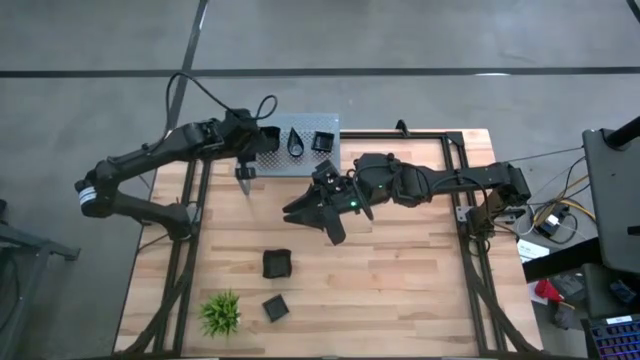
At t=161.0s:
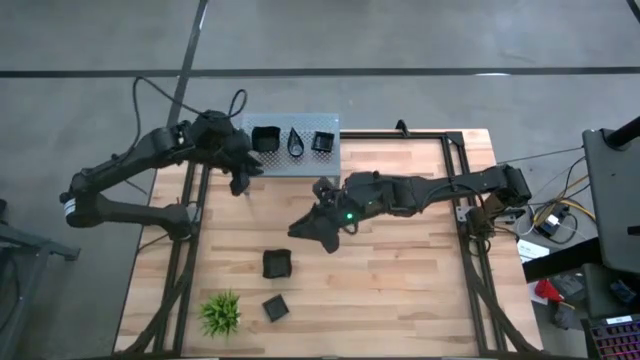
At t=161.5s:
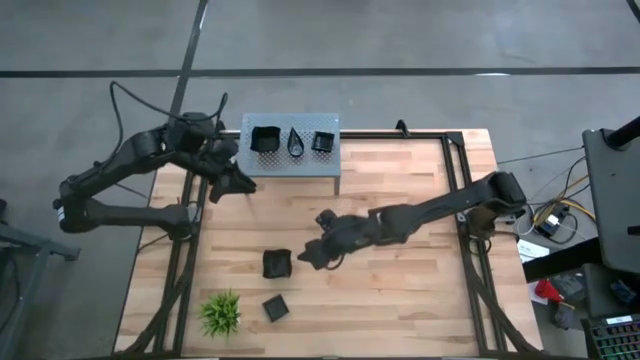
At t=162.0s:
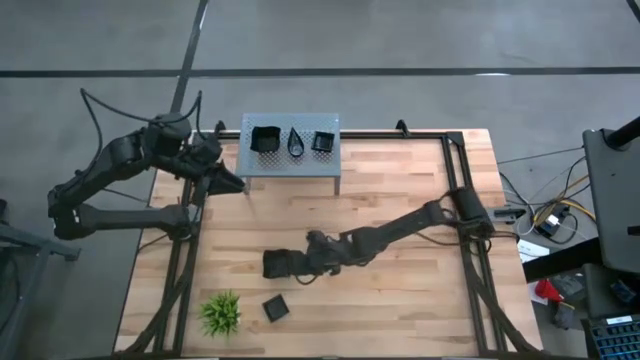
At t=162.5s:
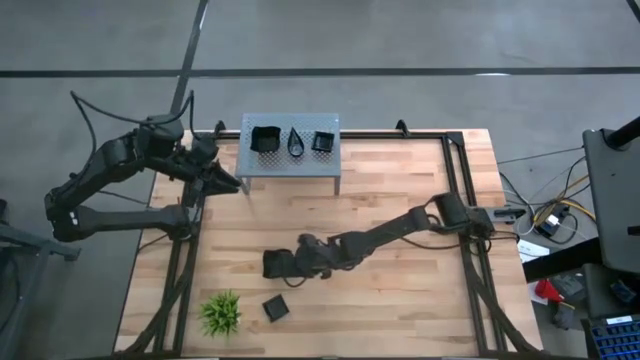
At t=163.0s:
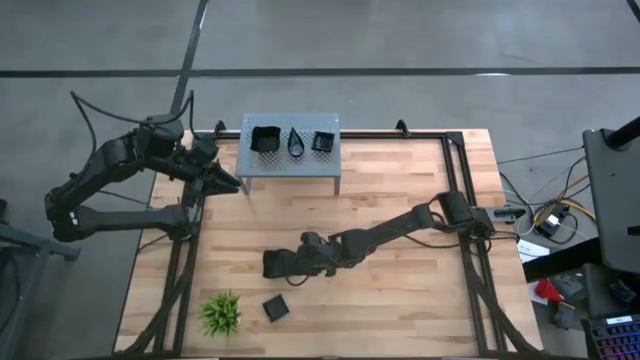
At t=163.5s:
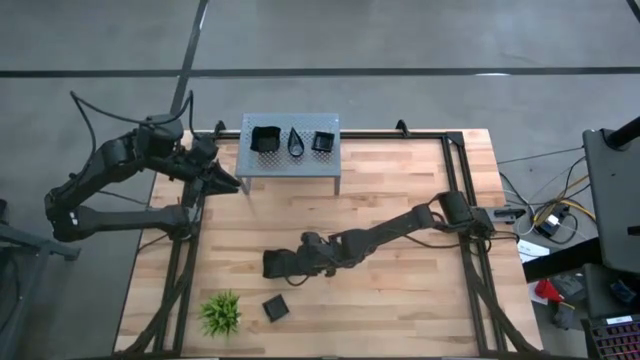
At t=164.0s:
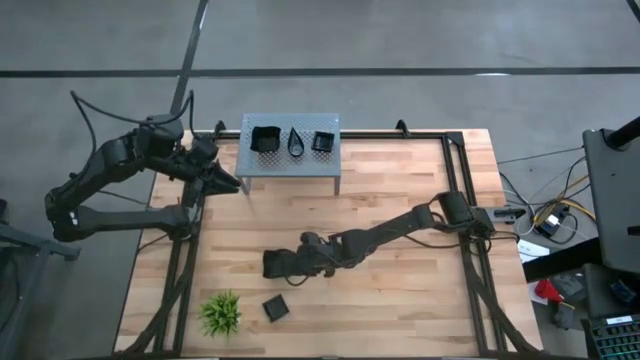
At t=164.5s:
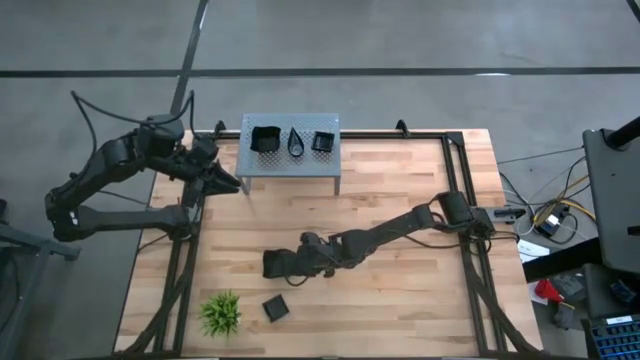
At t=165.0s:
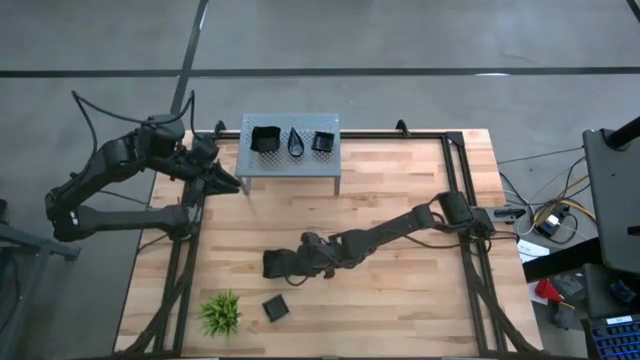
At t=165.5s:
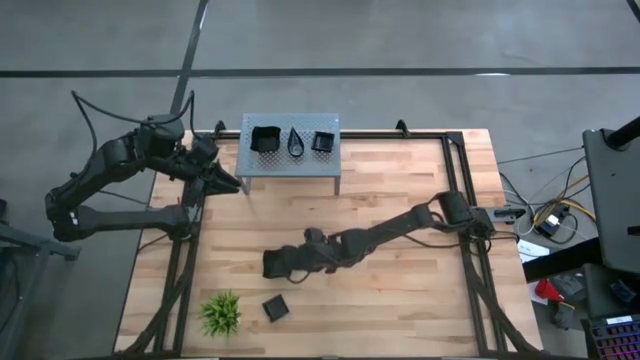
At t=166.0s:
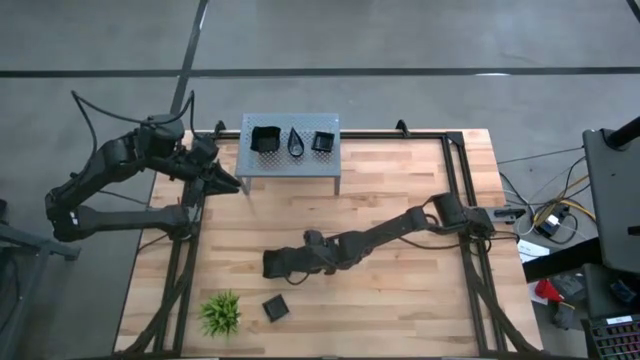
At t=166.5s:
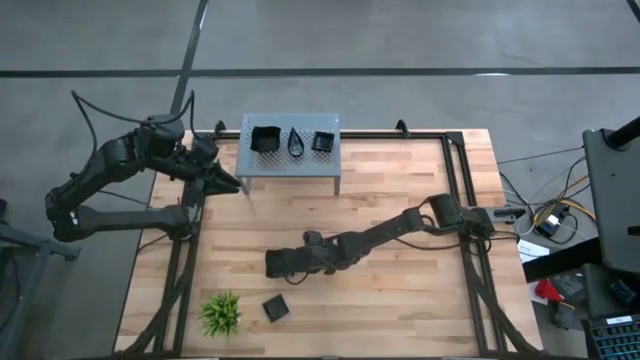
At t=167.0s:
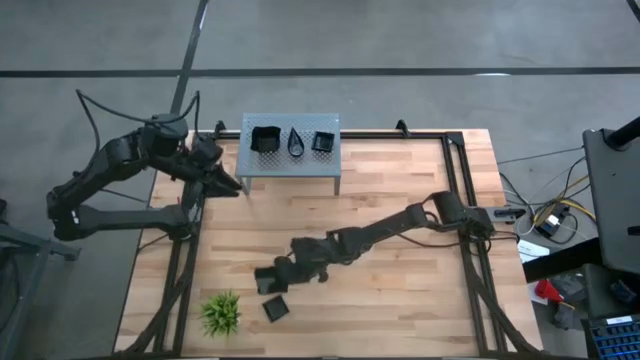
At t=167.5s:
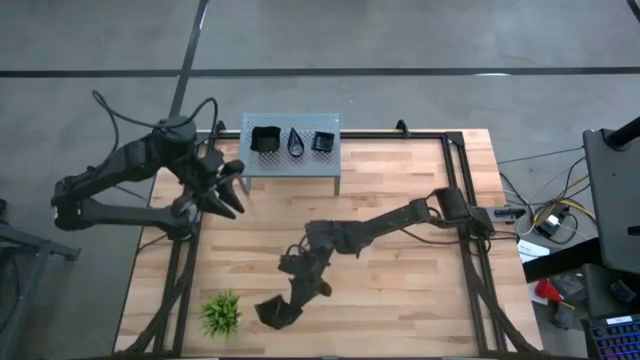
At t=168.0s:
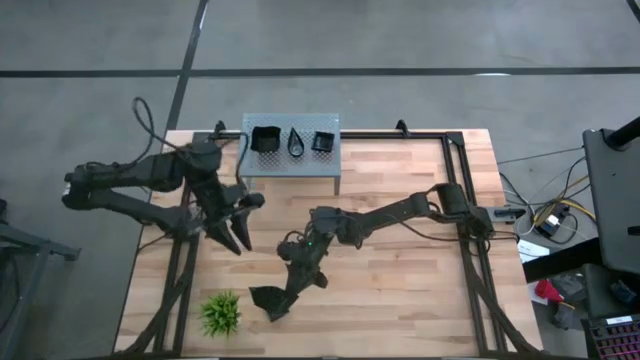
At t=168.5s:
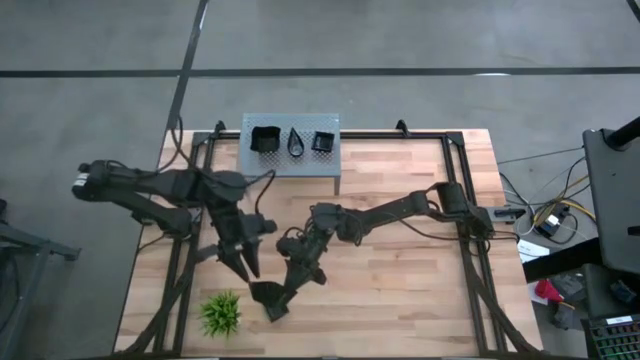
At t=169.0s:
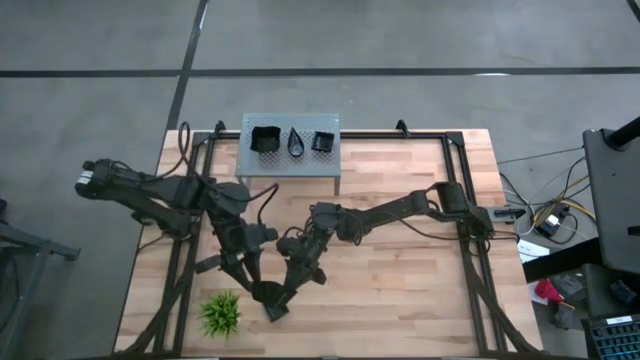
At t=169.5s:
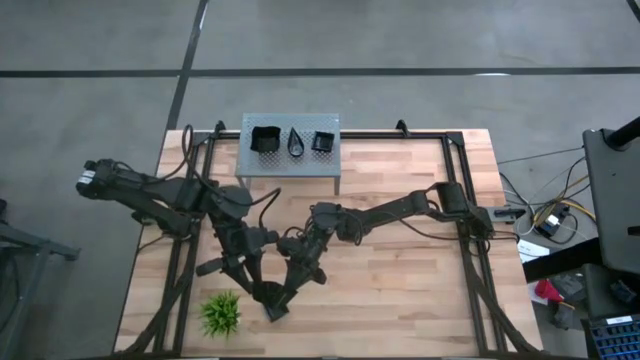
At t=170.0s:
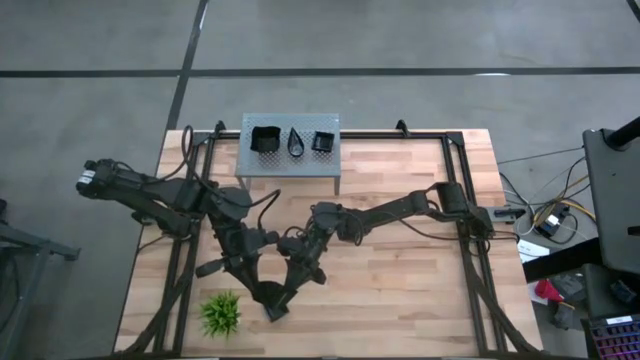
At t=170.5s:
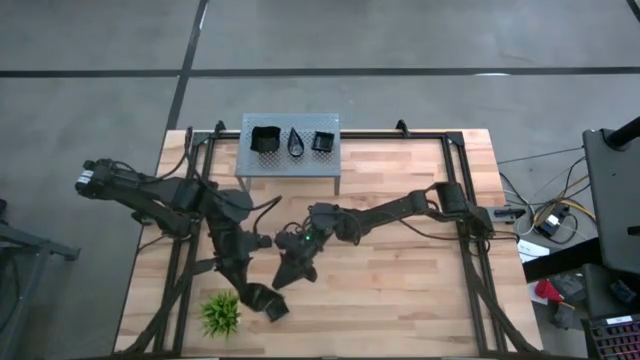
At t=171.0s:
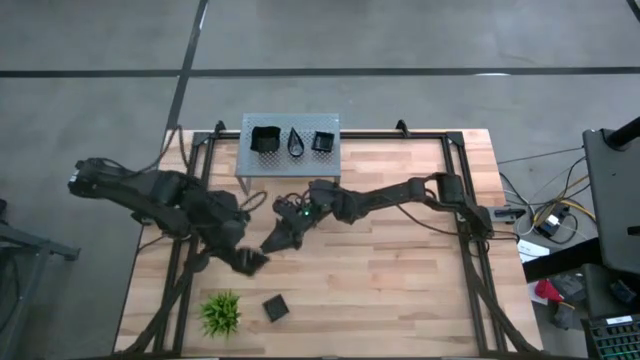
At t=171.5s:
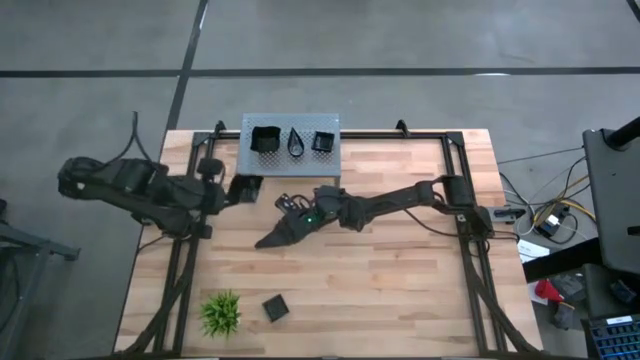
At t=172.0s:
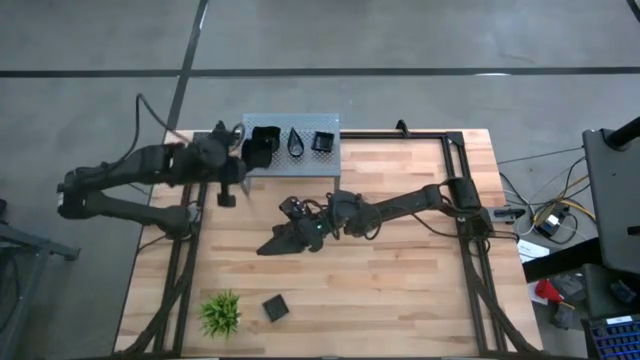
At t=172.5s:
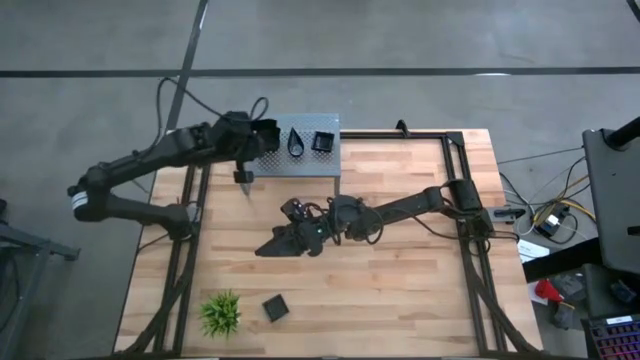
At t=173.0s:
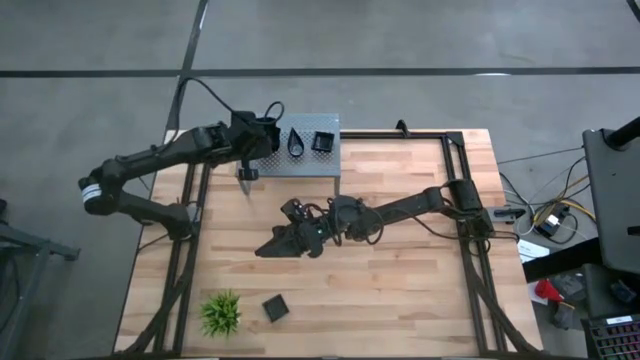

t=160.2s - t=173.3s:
Task: Pick & Place Mini shaped plates
Stack the distorted square plate on top of the other square plates on the shelf

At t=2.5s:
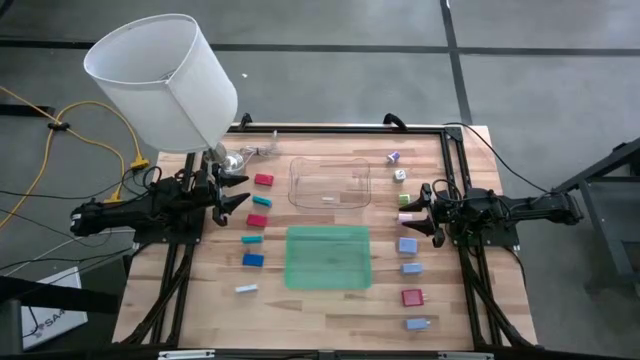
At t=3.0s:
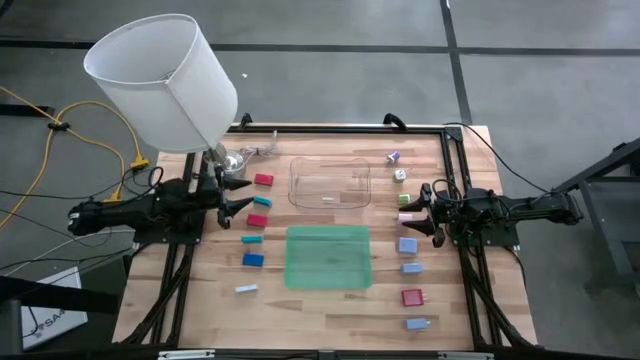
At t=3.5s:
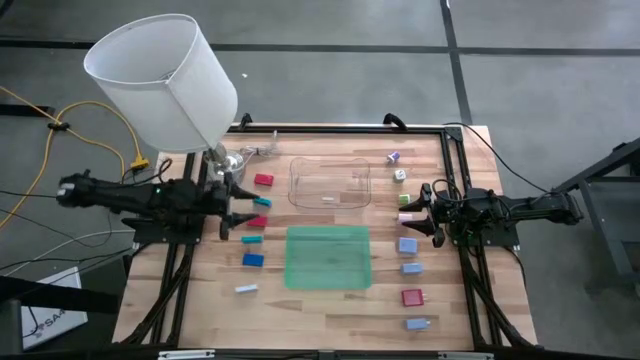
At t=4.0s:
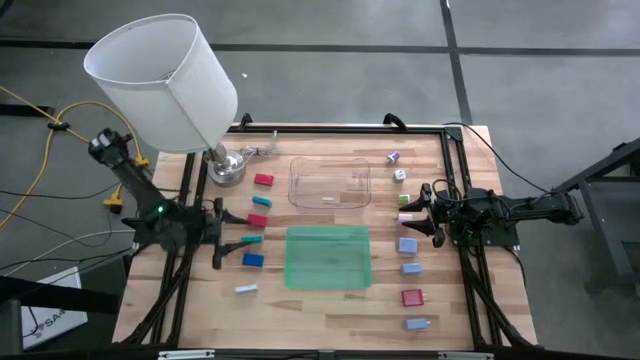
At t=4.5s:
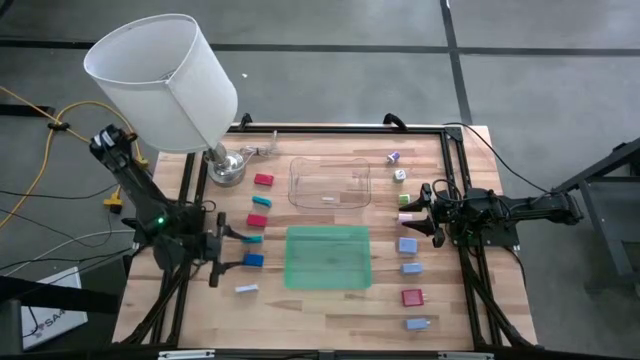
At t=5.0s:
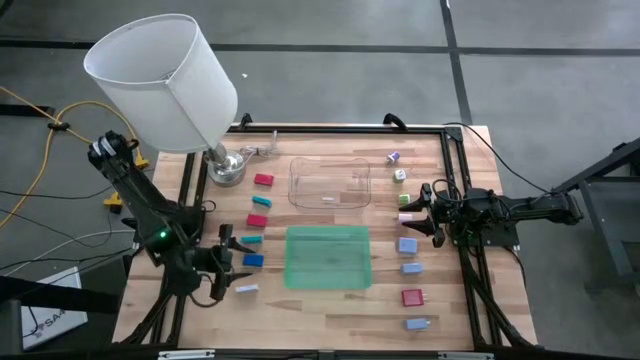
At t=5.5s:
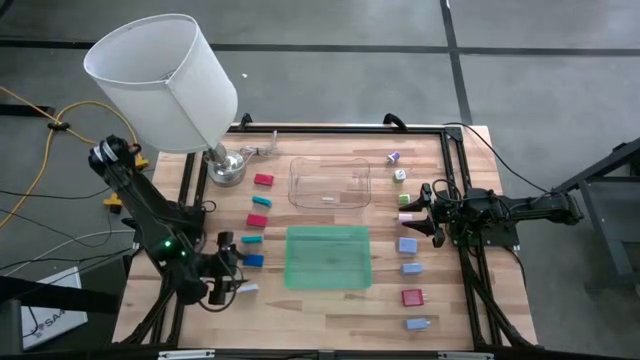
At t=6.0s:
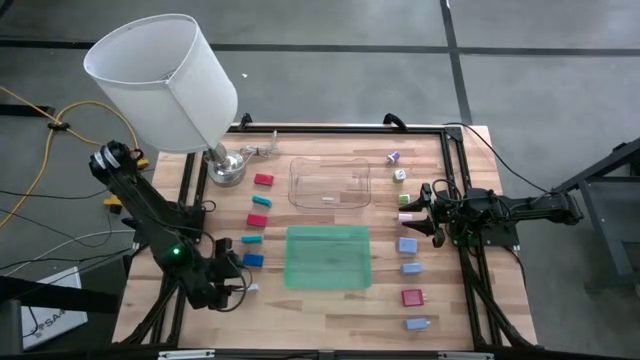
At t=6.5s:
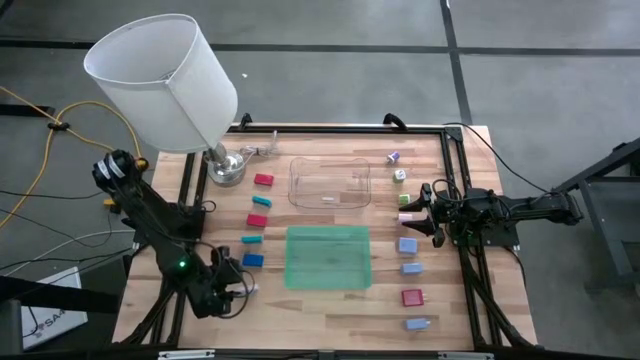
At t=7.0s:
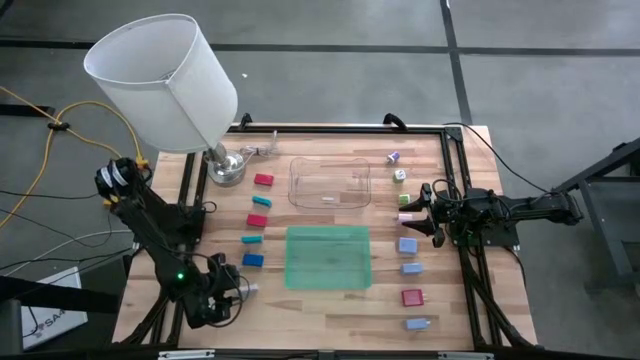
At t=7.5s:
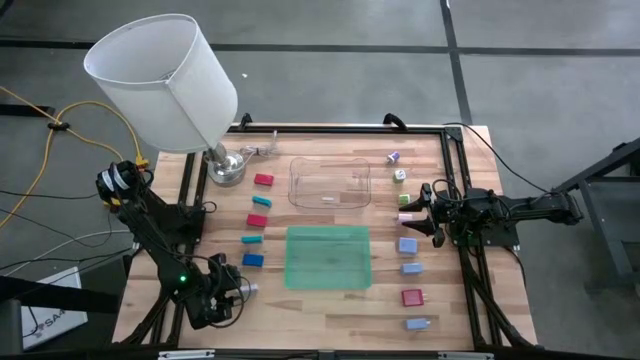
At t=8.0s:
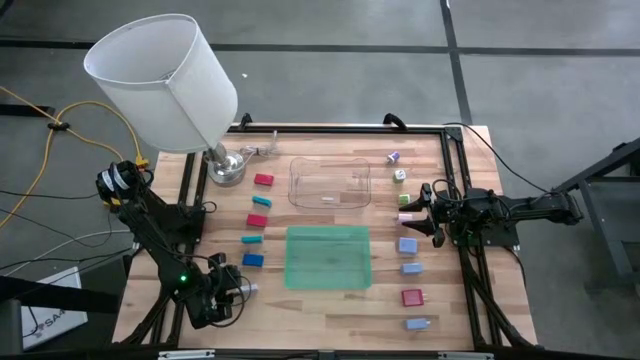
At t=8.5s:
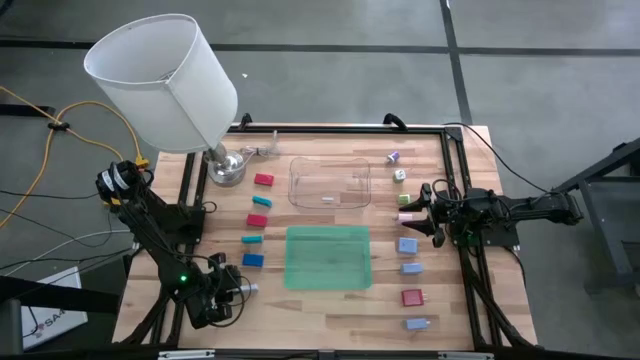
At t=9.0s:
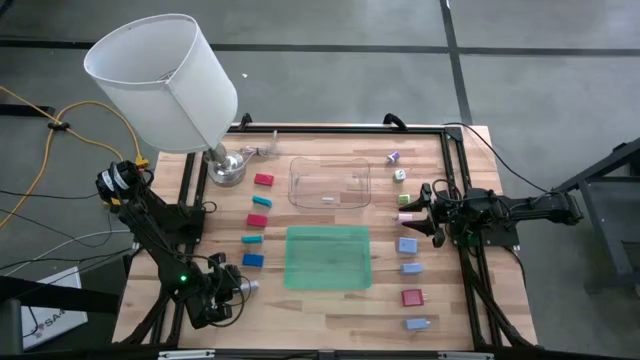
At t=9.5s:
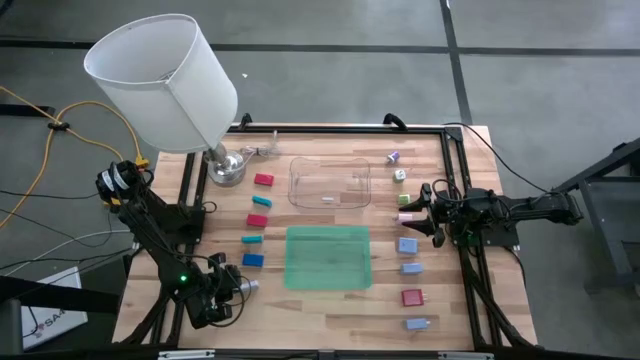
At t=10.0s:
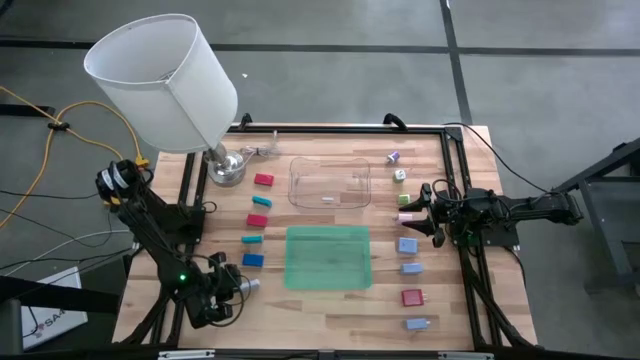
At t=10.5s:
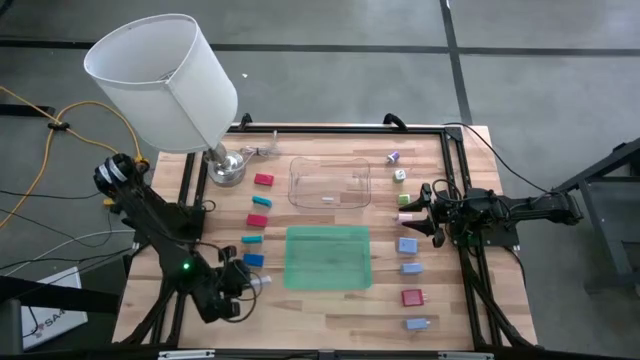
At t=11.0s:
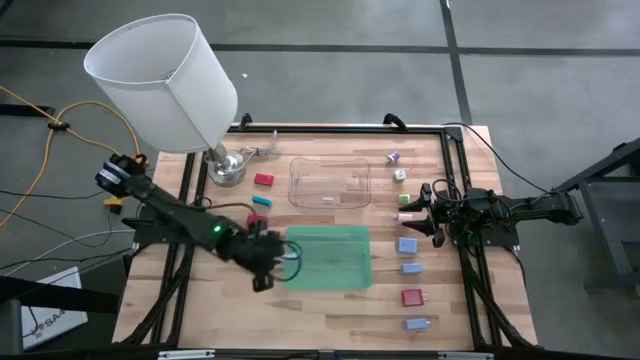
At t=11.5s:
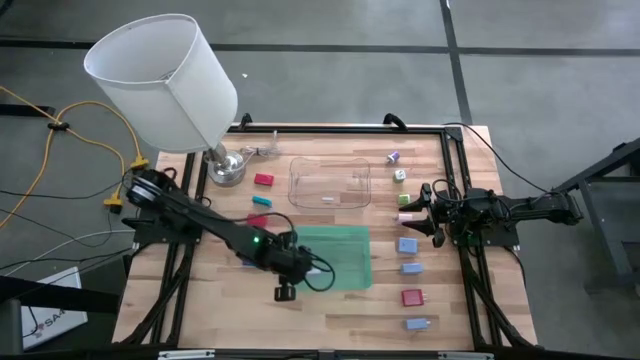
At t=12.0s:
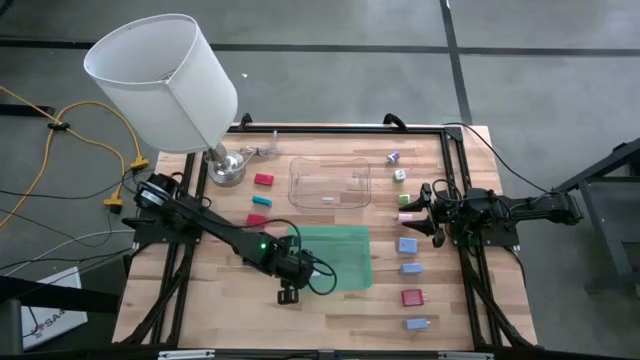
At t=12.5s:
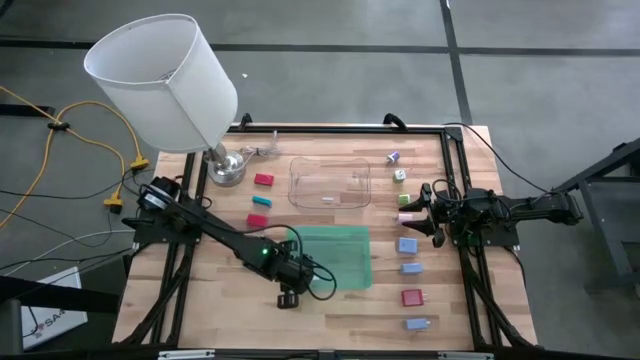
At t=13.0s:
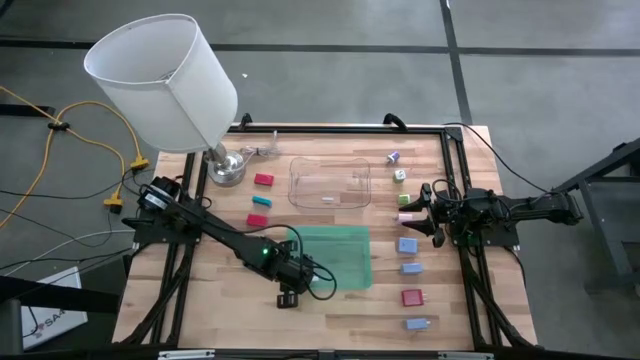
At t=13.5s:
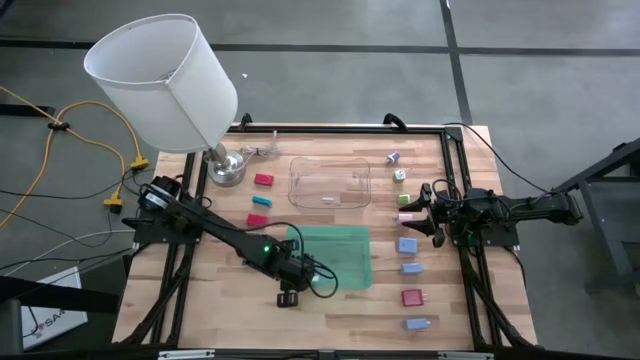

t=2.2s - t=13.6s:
Task: Pick & Place Office items
Put the white digital clock into the blue bin
